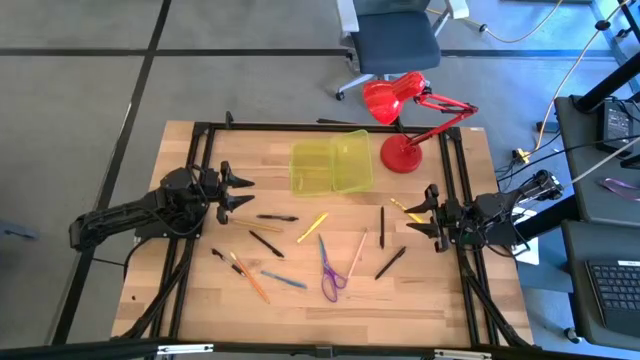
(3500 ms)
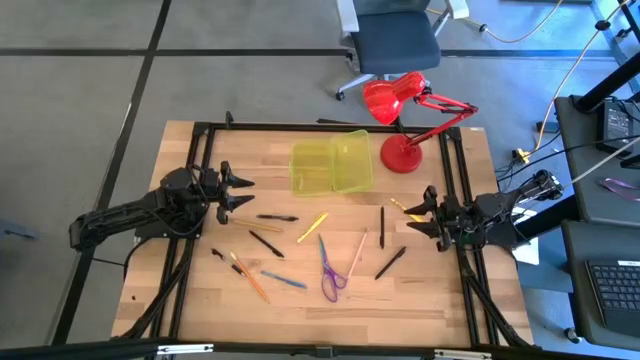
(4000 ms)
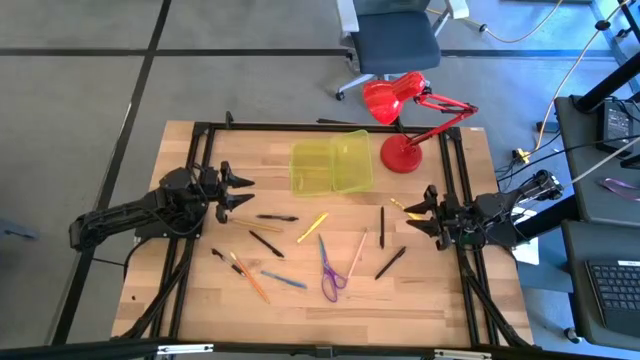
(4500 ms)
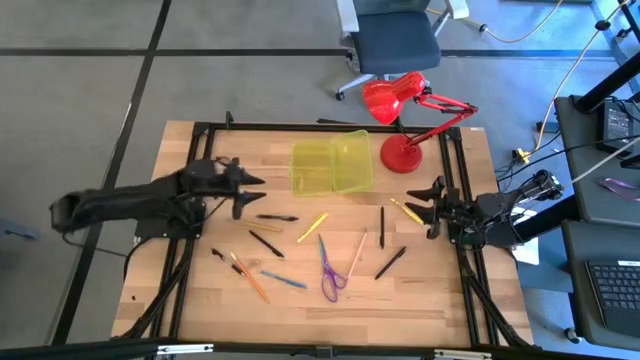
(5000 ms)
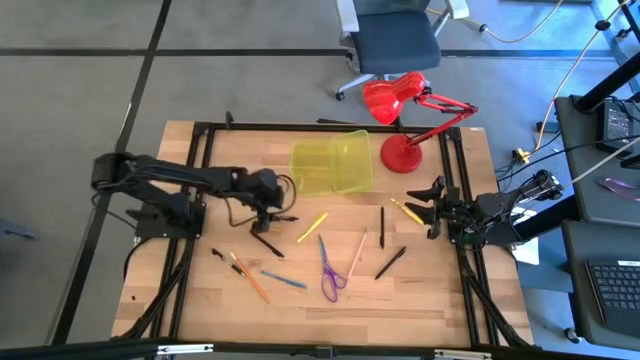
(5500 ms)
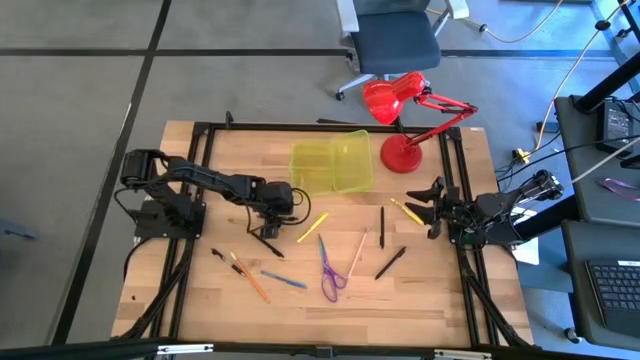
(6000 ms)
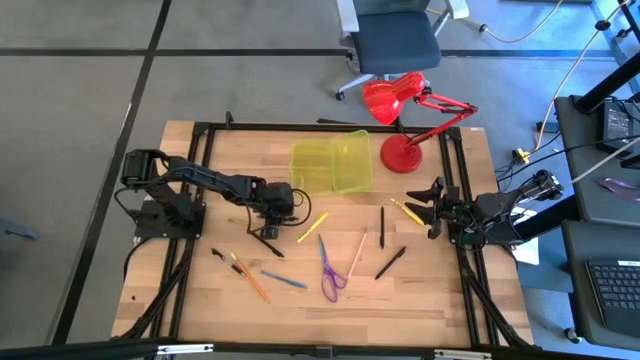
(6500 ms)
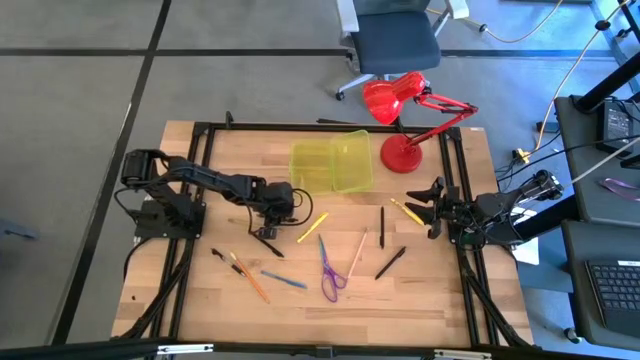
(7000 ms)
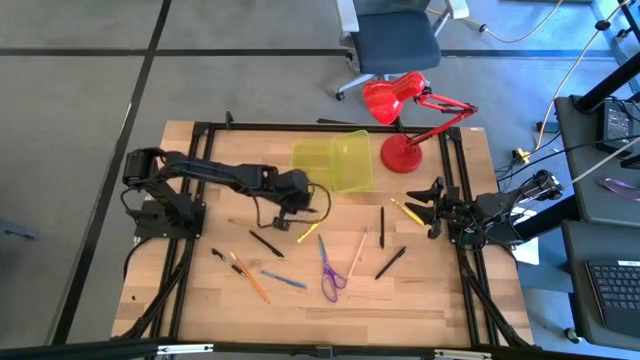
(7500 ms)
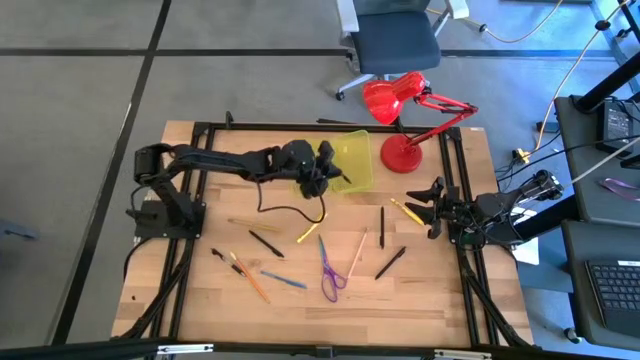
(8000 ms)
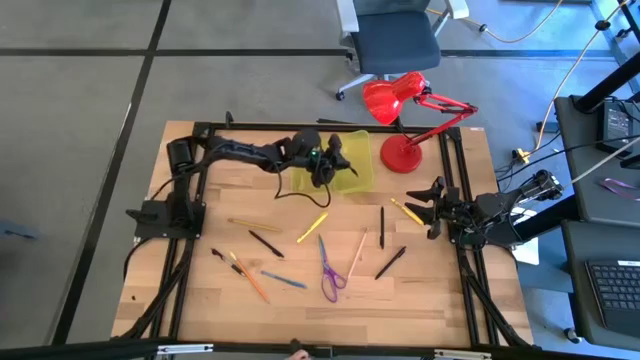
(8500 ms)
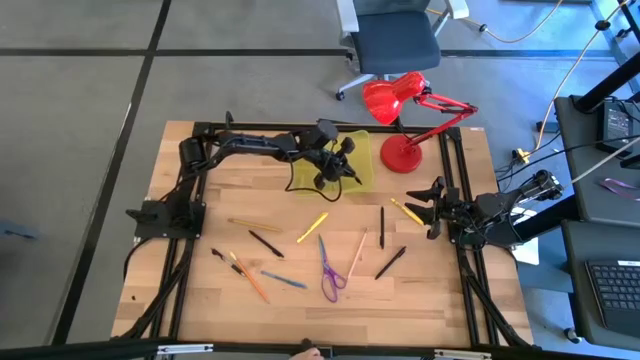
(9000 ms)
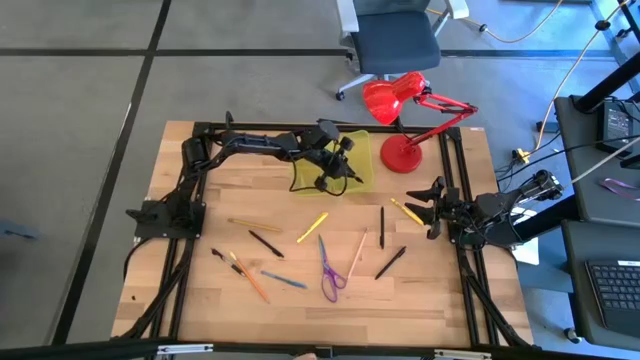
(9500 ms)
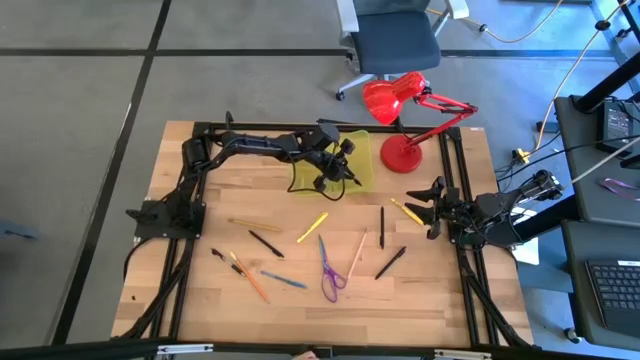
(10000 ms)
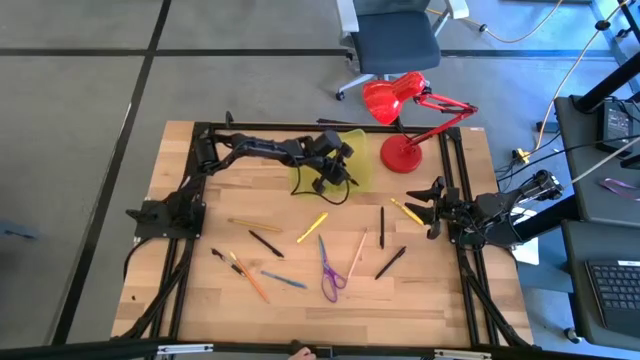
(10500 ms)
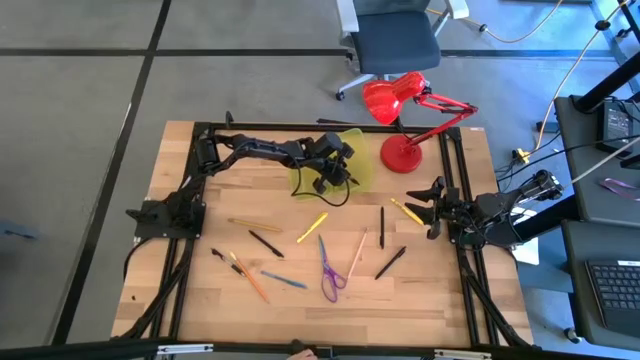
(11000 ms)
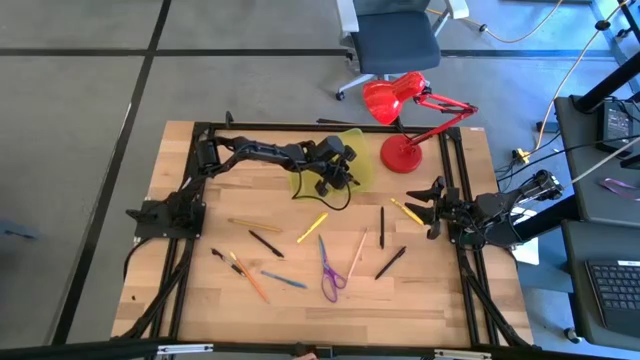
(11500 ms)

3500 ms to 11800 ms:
Task: Pick & place school supplies into a supply box
Put the black pen into the yellow supply box

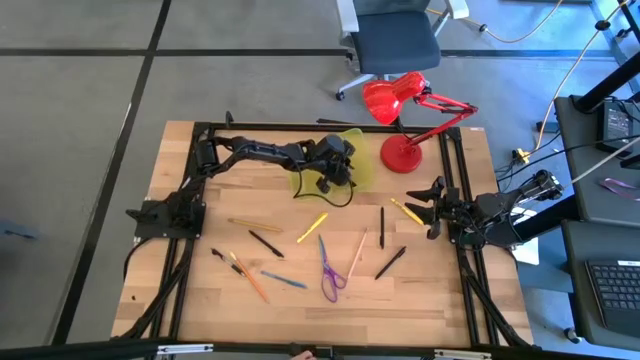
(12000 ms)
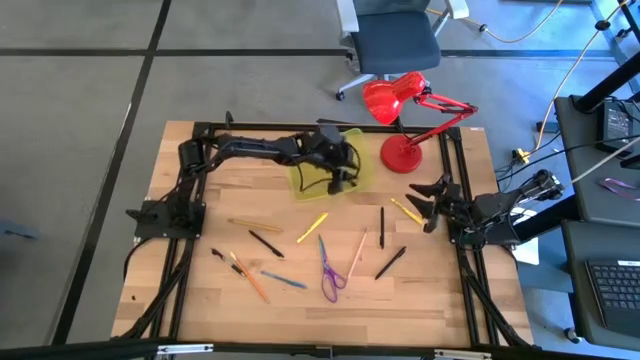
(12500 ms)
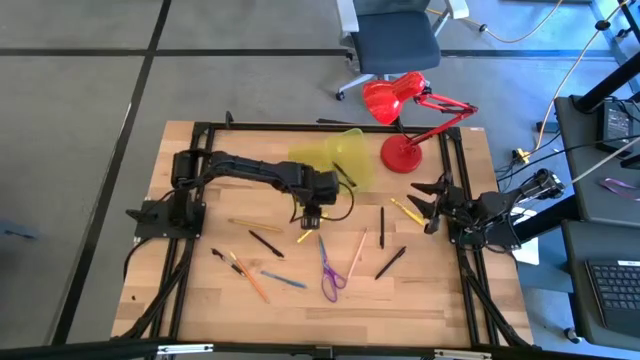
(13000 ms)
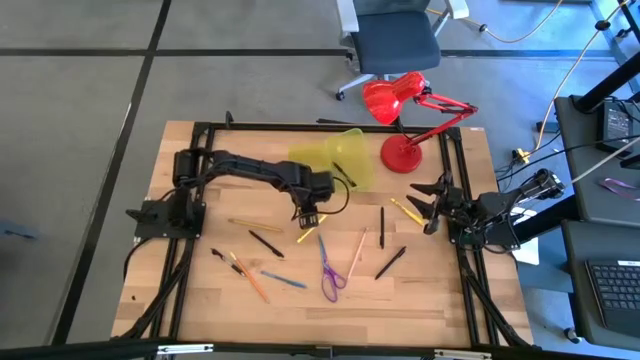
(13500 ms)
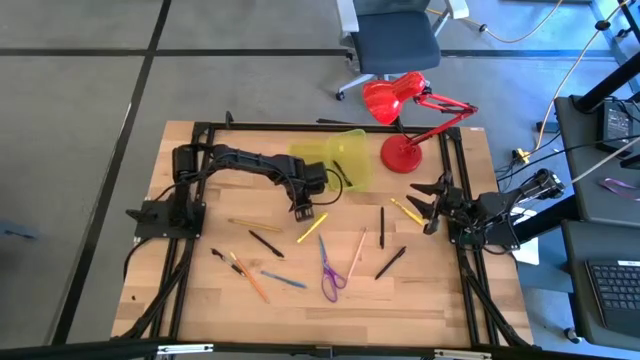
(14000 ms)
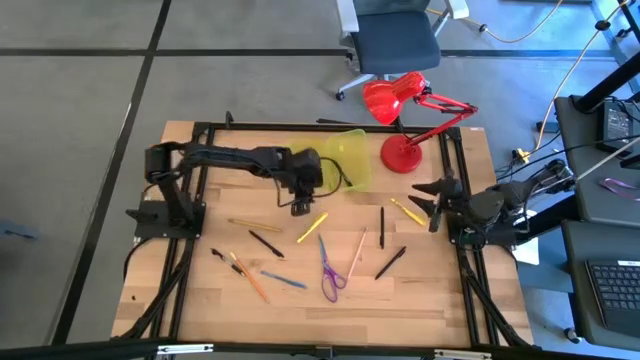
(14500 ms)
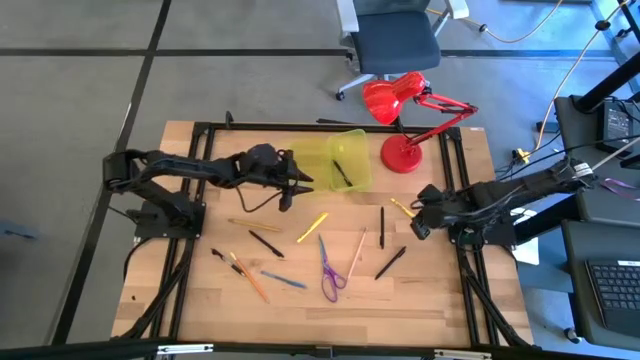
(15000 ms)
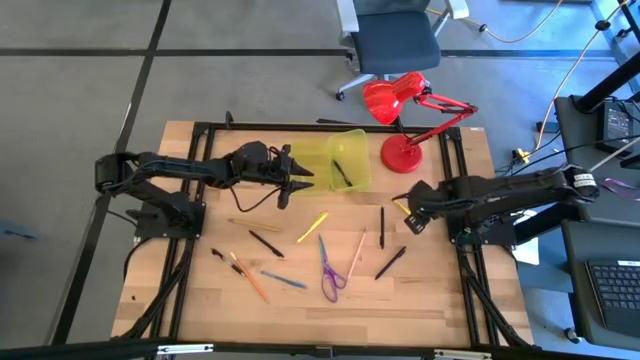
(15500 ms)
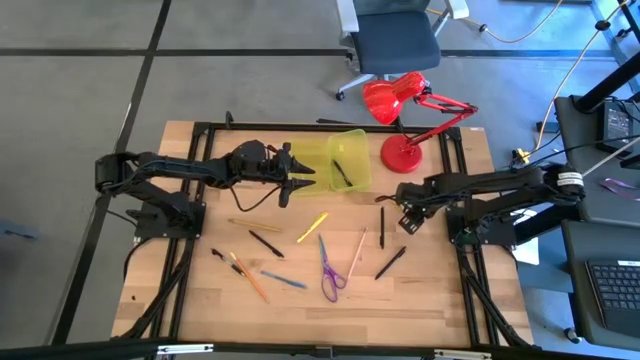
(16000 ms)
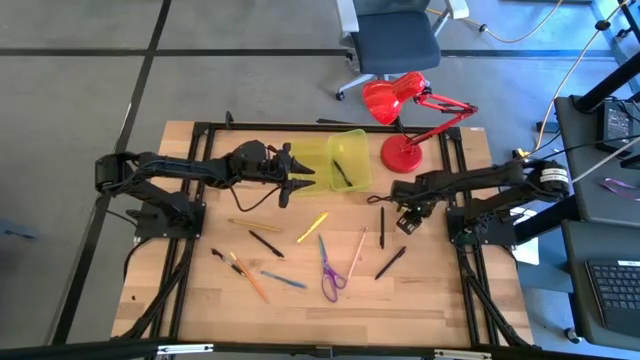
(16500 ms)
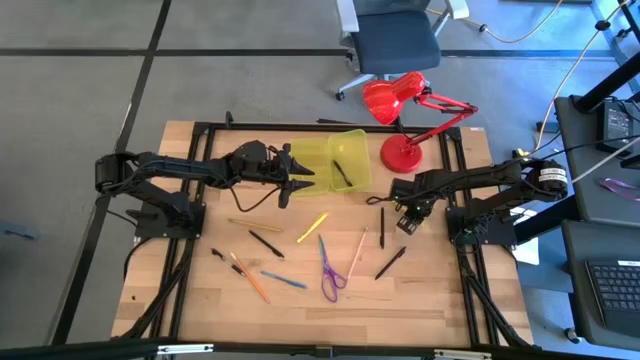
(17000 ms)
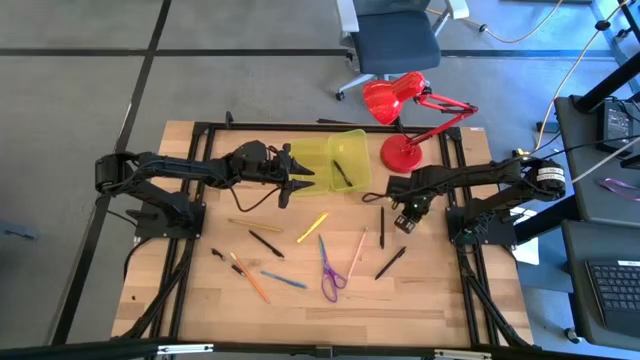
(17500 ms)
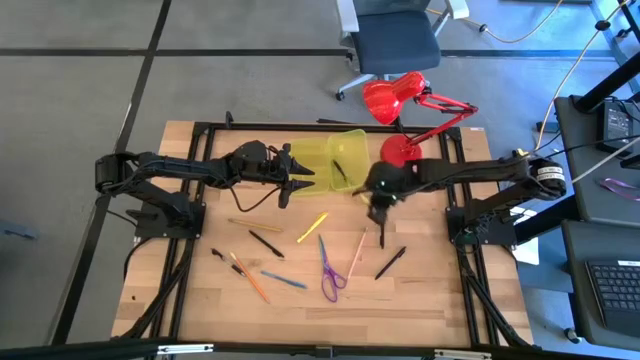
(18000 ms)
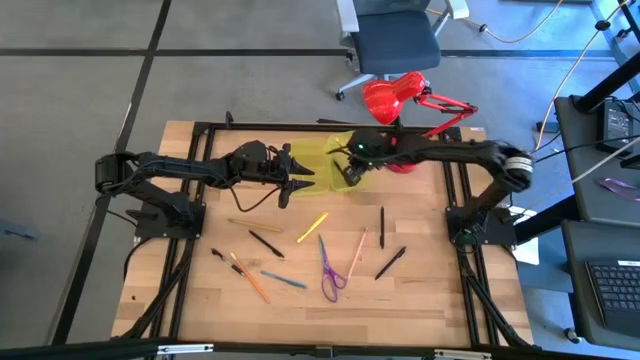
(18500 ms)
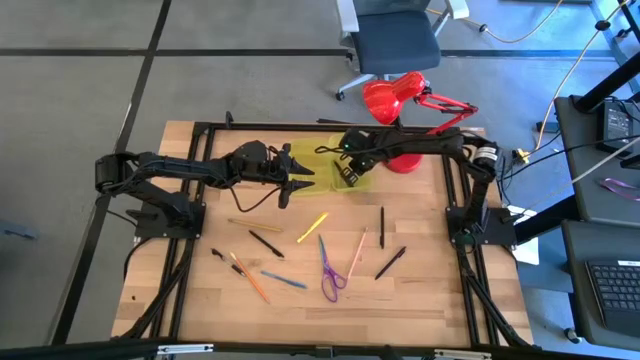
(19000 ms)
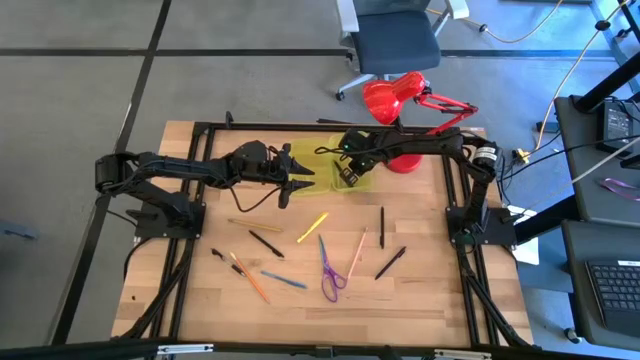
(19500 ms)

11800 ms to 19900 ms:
Put the right yellow pen into the yellow supply box

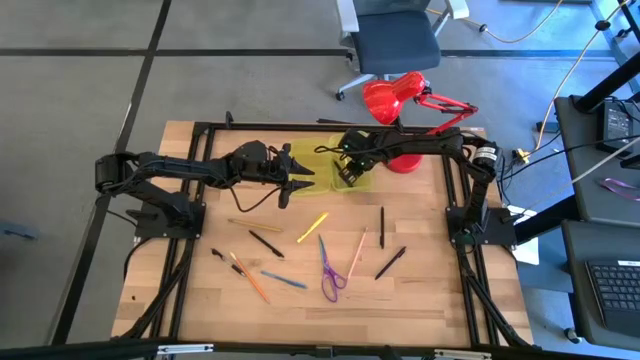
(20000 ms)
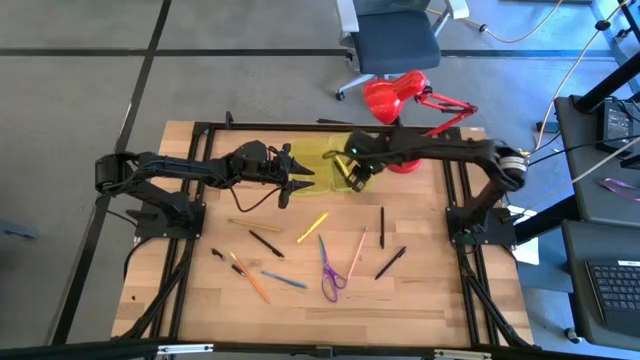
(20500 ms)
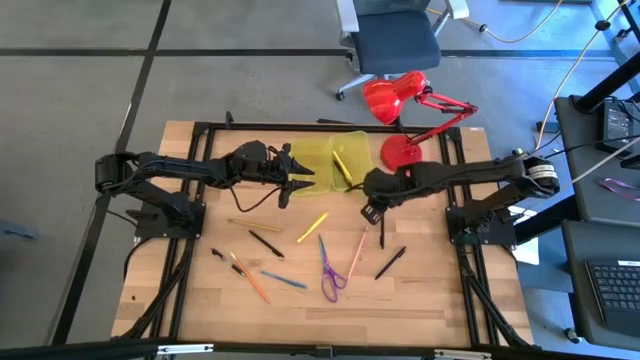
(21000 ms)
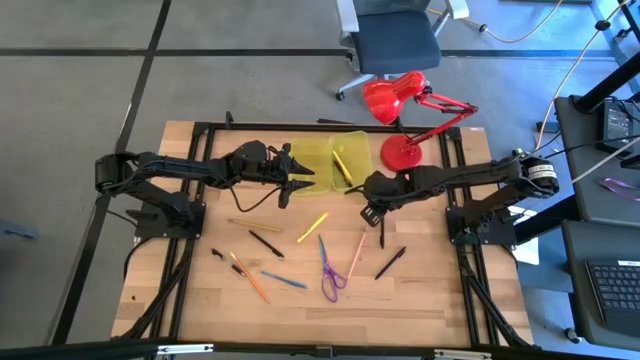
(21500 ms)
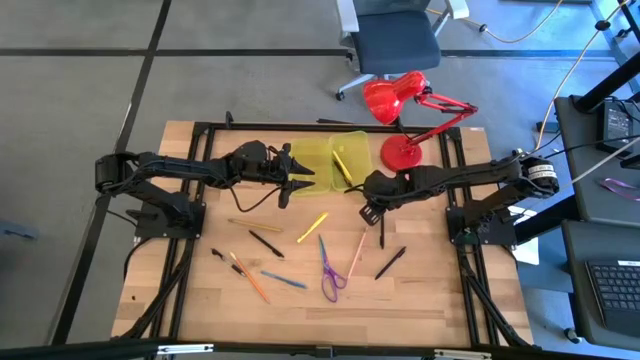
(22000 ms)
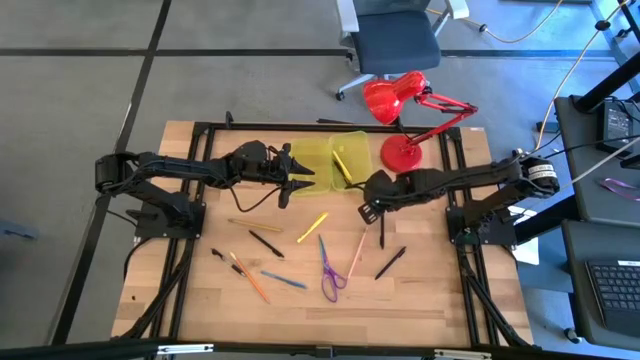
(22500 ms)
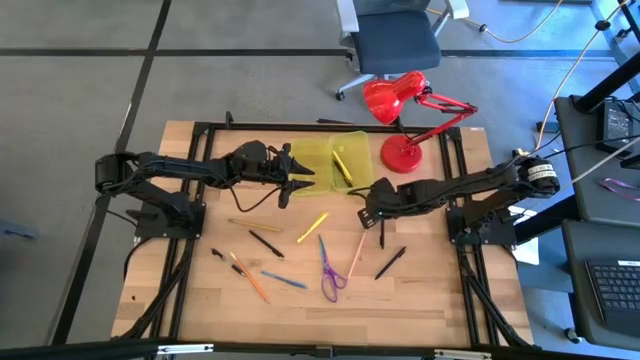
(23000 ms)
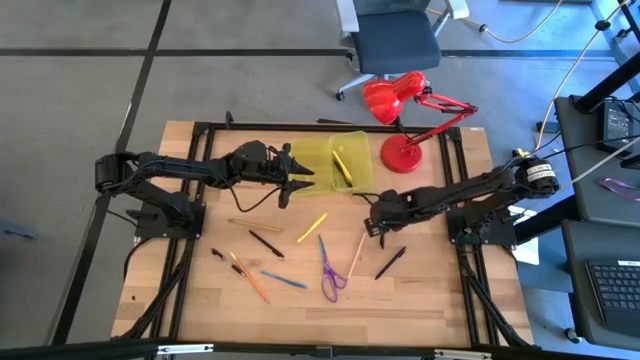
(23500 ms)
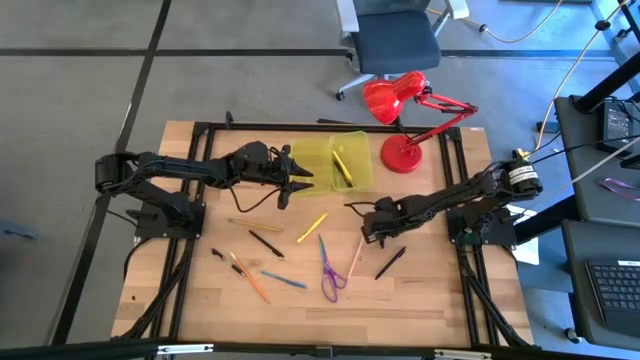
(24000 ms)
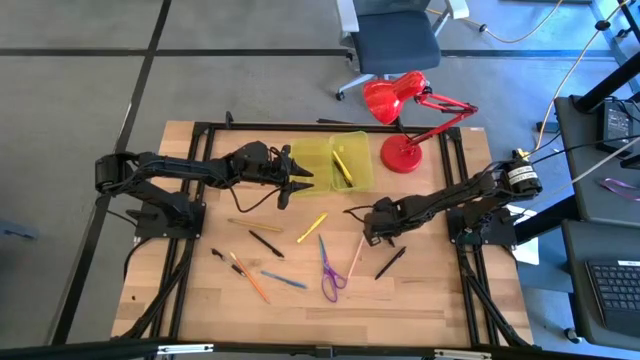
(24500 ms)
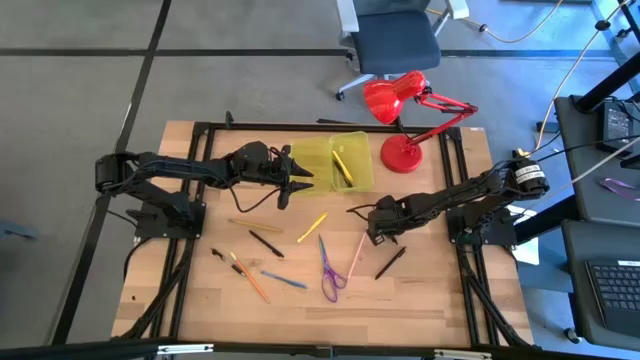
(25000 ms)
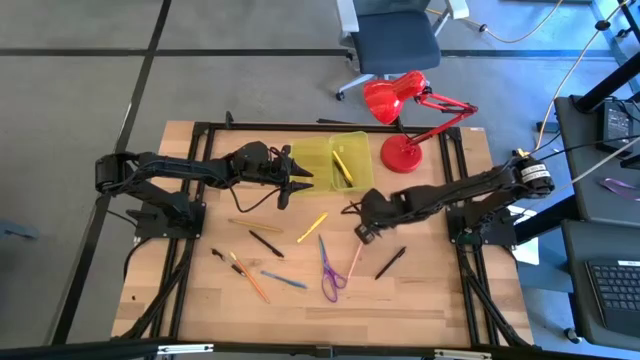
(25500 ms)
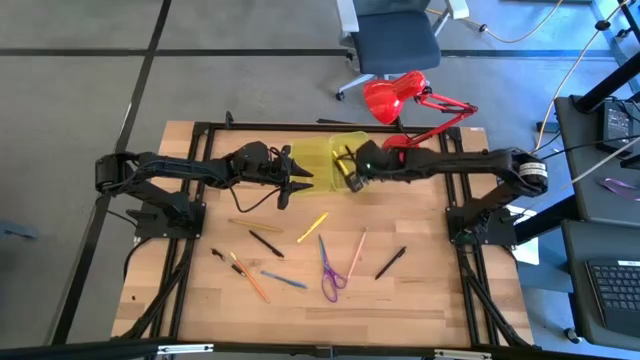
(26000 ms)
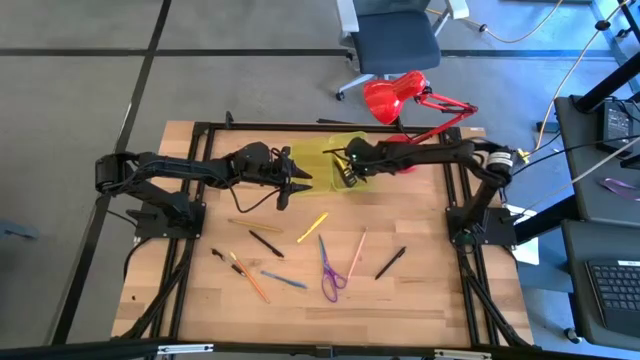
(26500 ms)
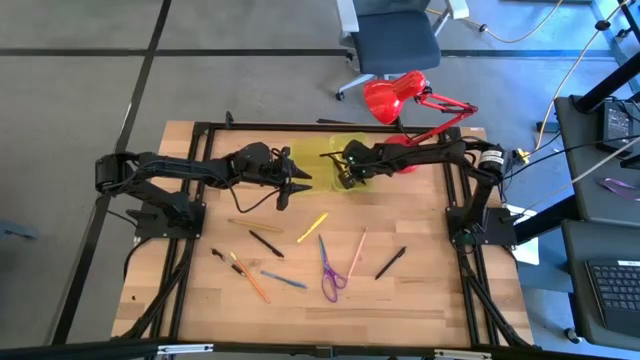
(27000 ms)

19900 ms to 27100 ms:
Put the black pen into the yellow supply box
